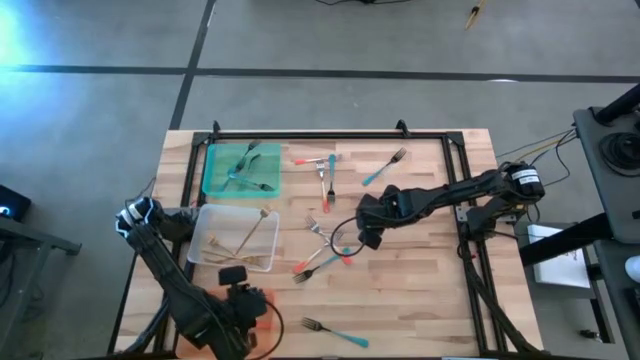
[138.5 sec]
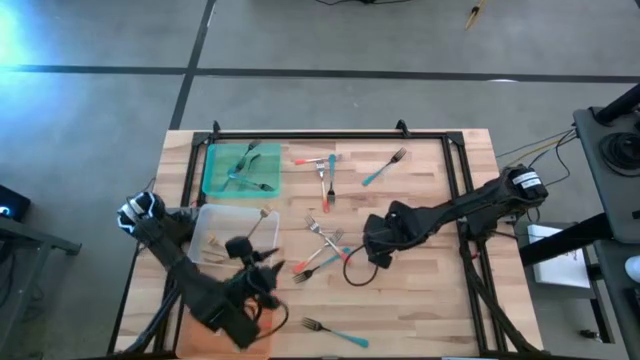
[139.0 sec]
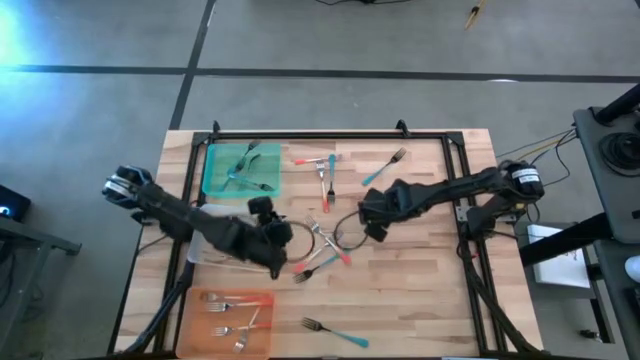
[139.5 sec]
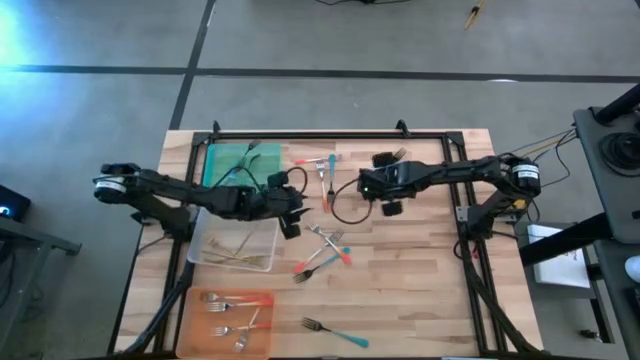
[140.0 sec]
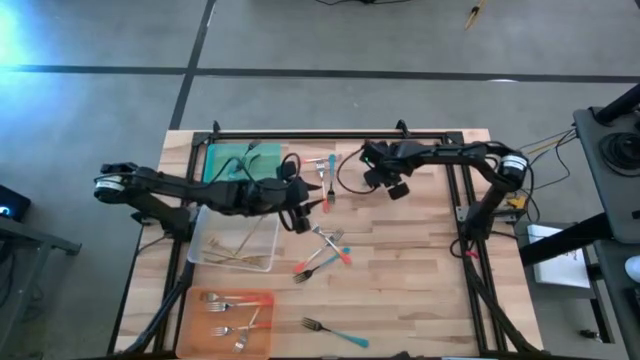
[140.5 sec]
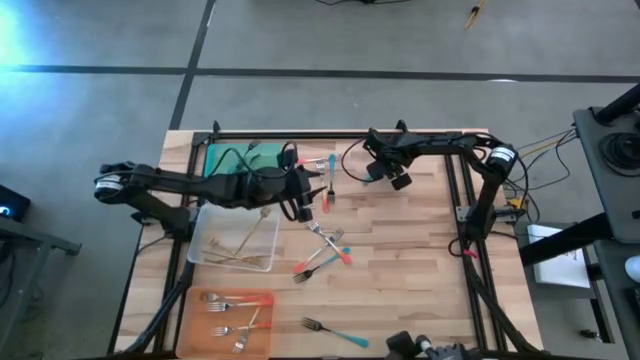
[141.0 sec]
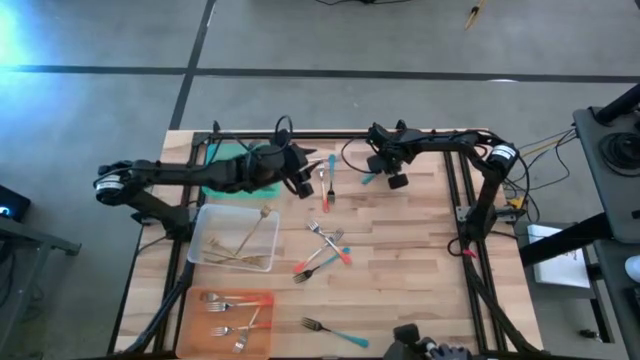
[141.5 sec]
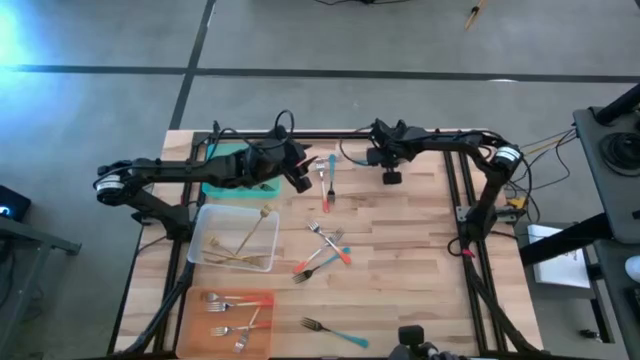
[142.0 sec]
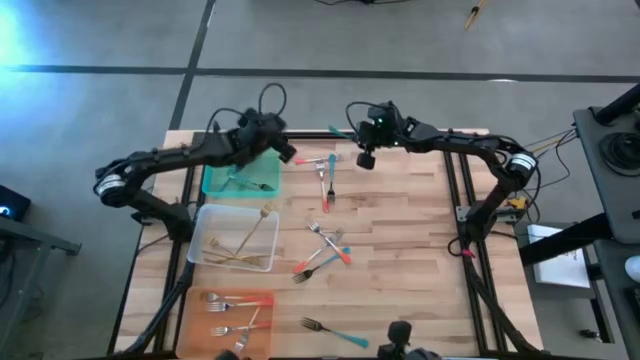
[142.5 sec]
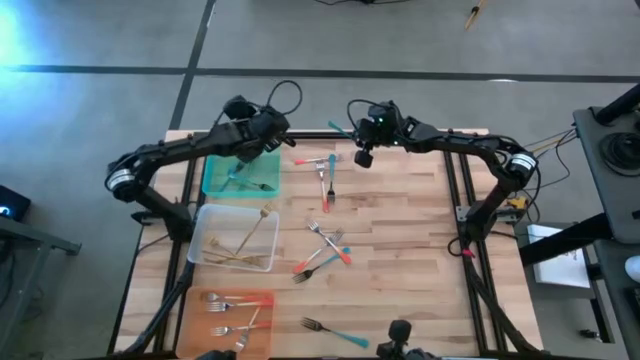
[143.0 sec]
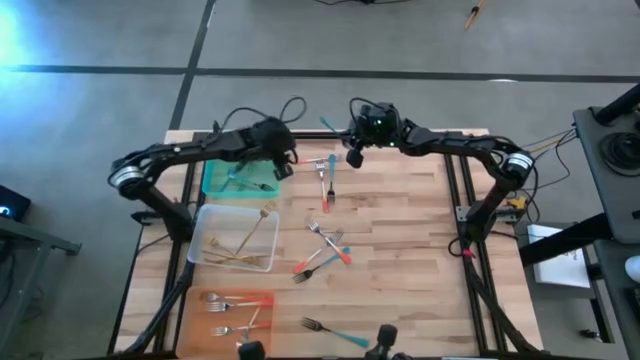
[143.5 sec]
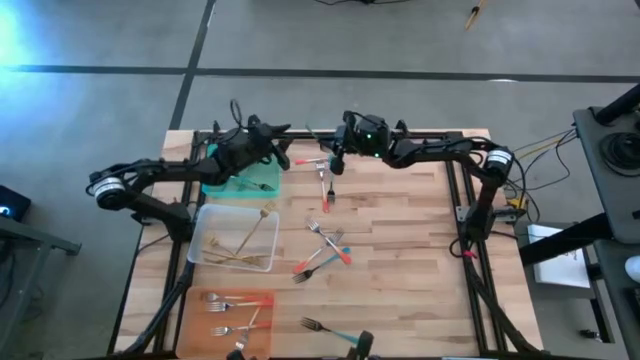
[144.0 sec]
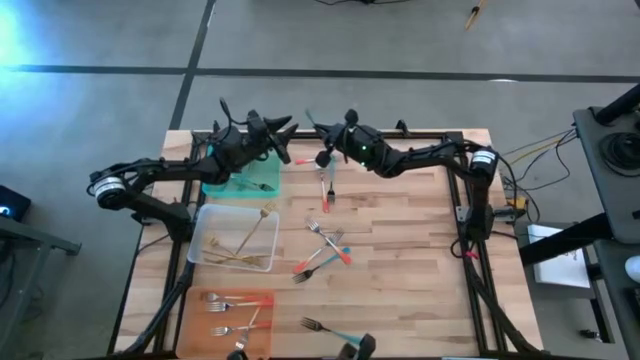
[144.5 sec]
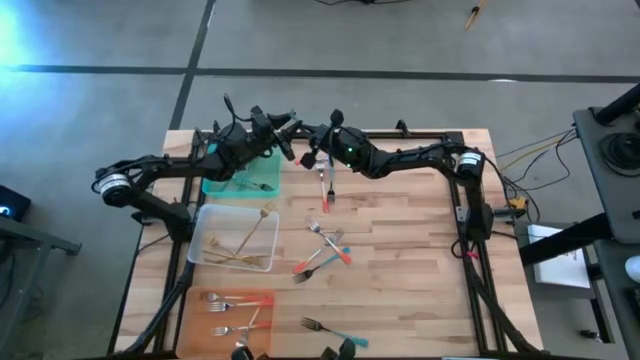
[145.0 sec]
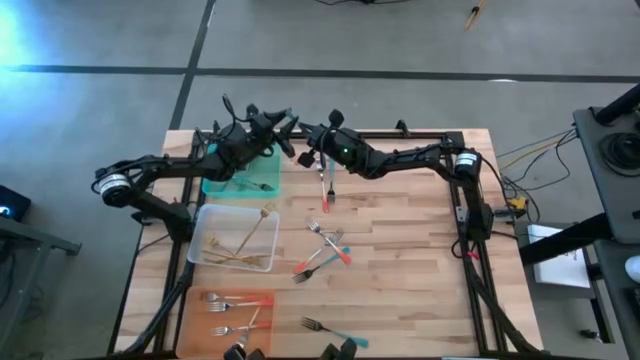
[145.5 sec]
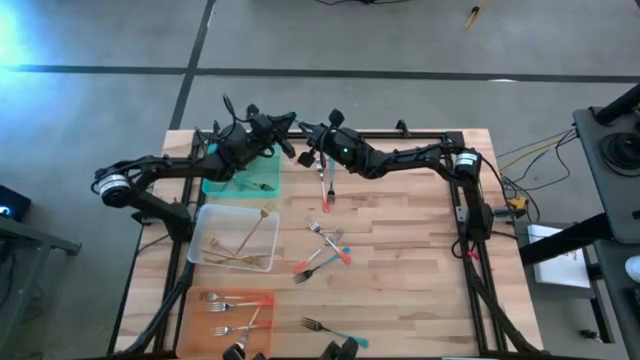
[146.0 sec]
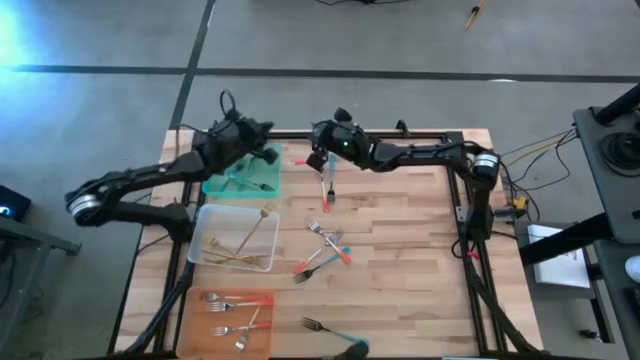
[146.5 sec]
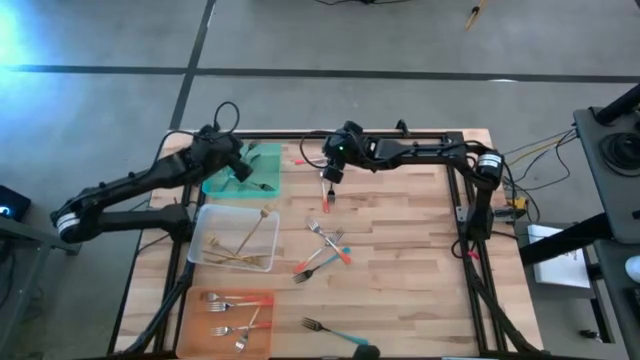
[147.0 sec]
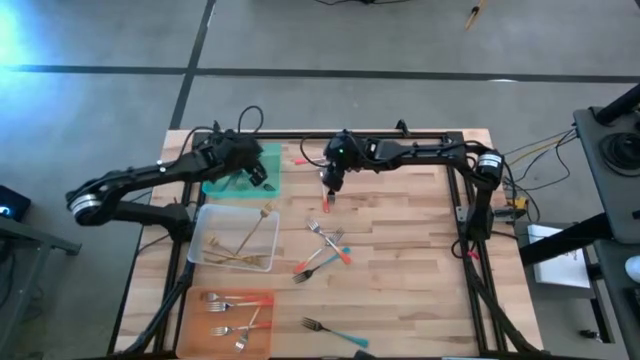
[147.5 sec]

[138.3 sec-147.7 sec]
Task: Sort silverware by color (type)
Put the blue fork into the blue bin

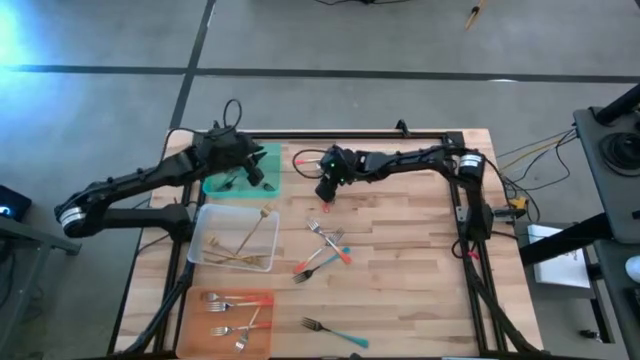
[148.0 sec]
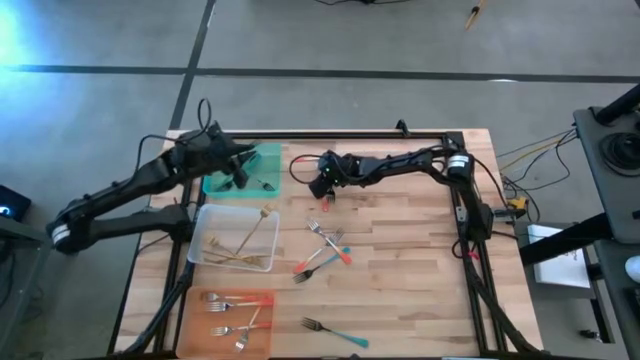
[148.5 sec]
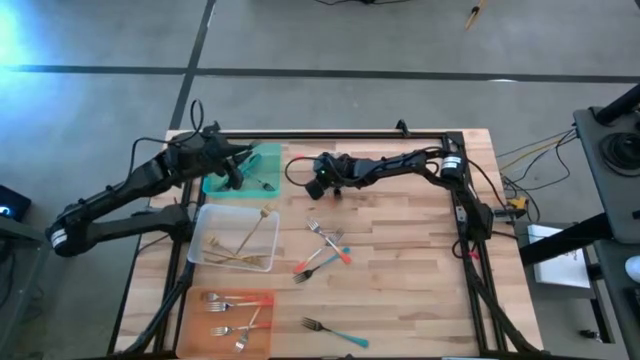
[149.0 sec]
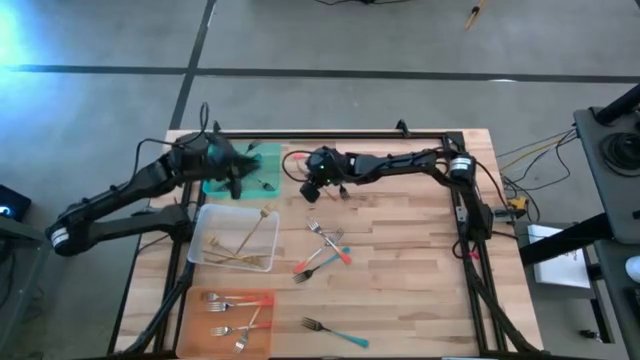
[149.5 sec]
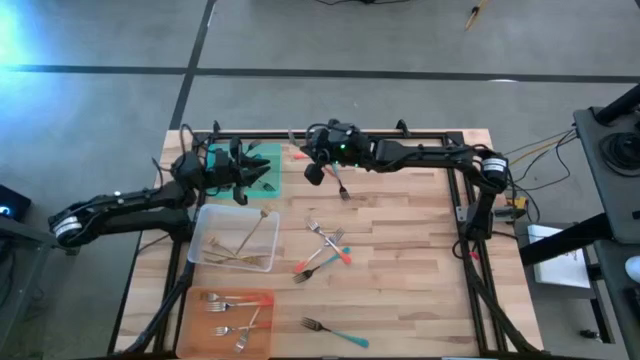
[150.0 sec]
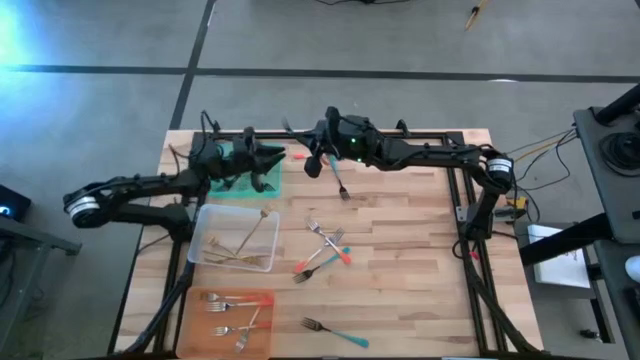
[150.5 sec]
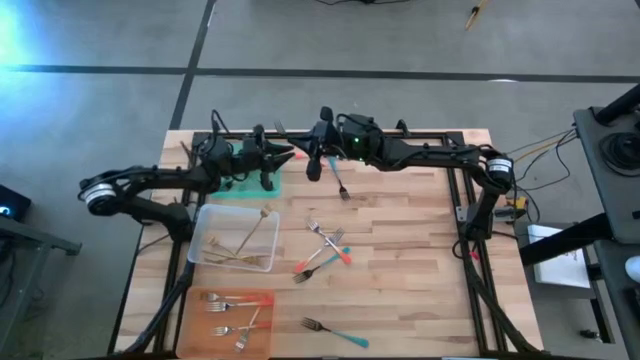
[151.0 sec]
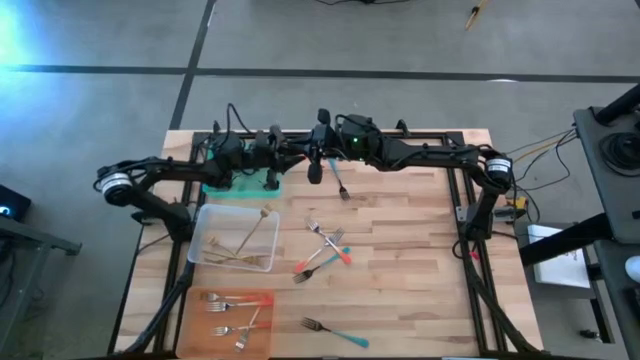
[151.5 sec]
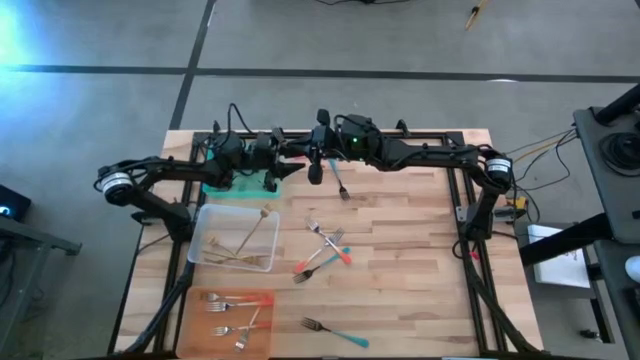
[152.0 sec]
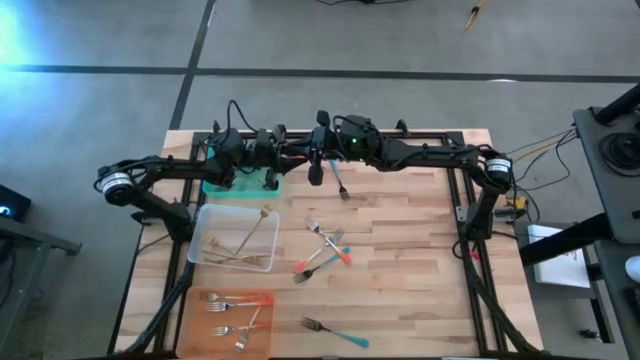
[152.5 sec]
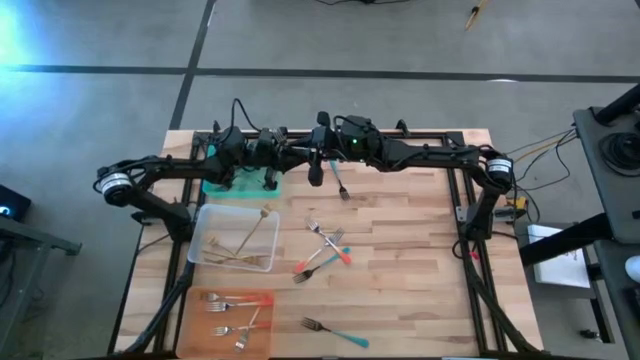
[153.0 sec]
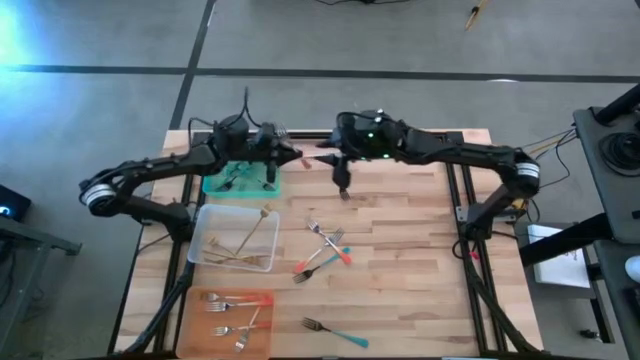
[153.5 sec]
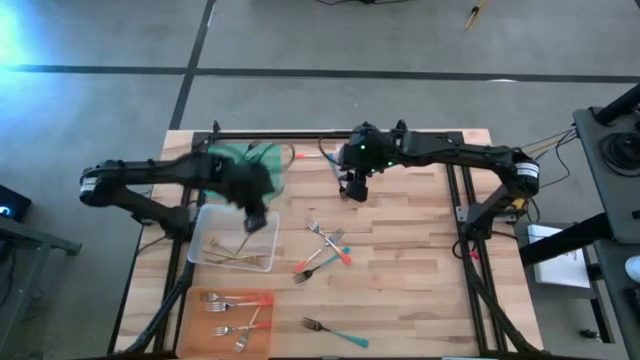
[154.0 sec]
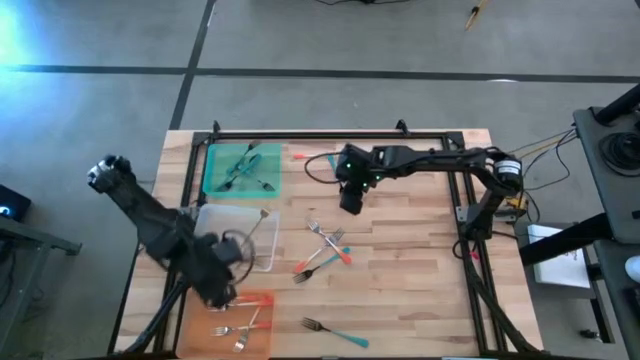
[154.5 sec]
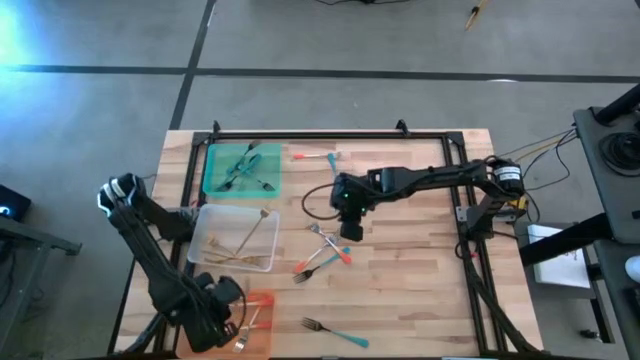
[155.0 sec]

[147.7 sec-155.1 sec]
Put the orange fork into the orange bin

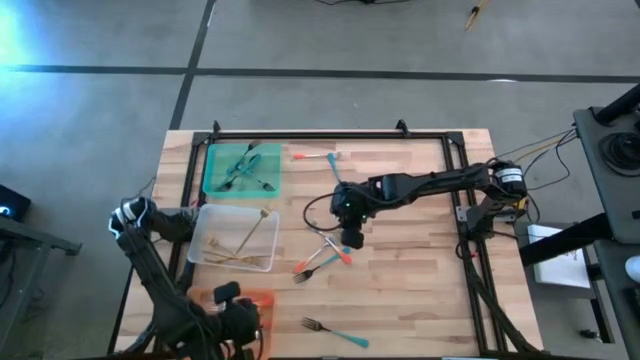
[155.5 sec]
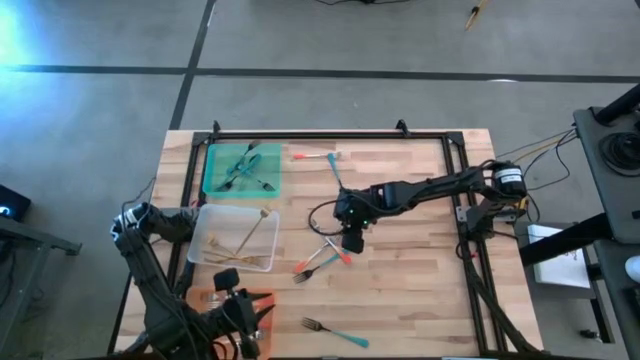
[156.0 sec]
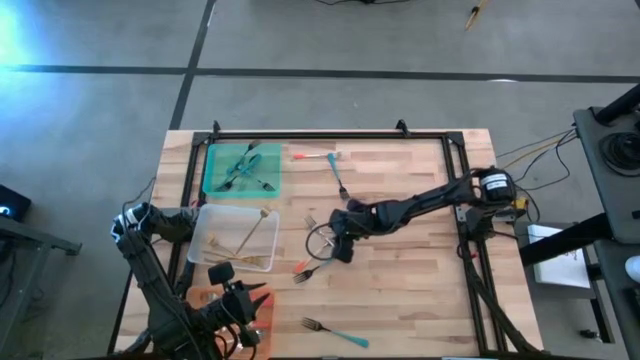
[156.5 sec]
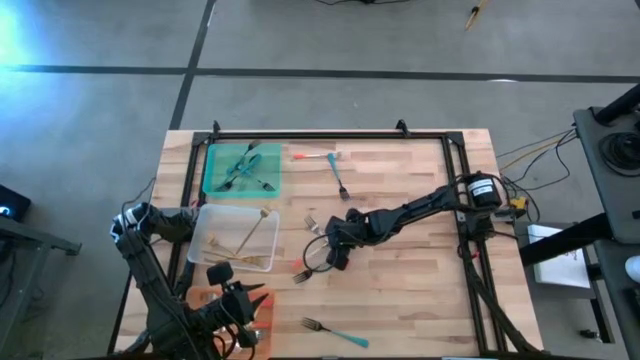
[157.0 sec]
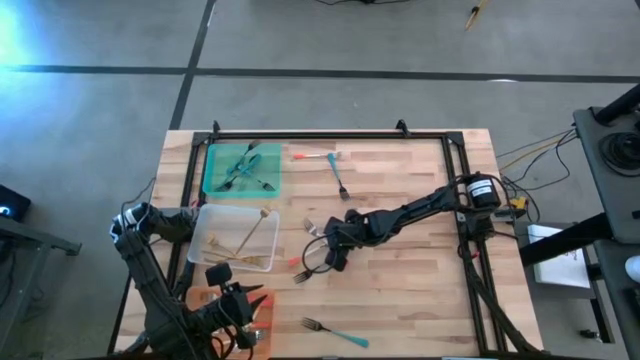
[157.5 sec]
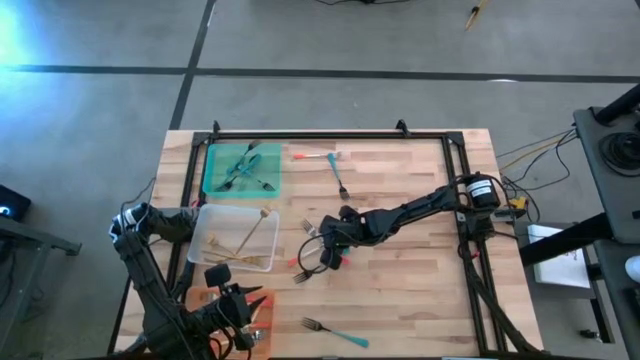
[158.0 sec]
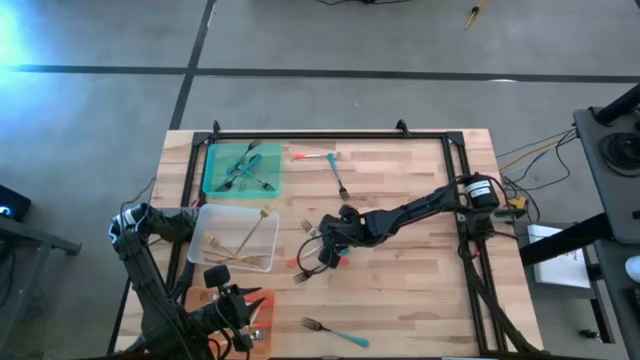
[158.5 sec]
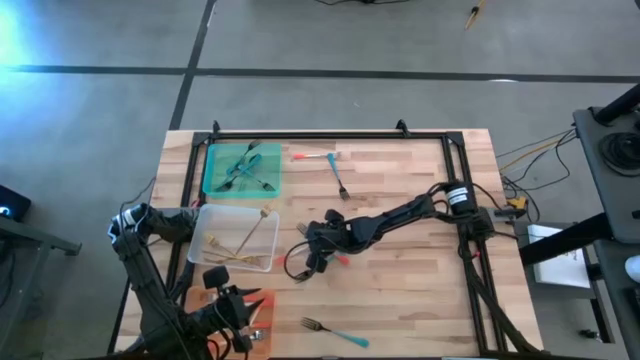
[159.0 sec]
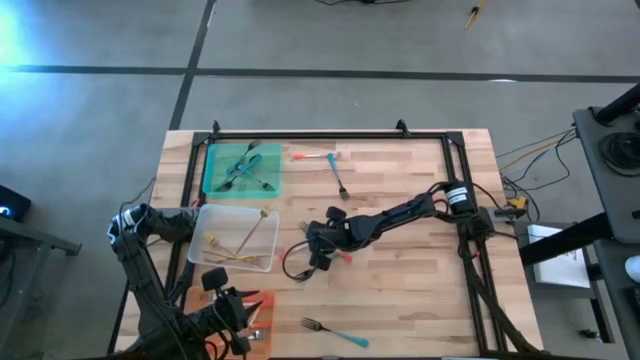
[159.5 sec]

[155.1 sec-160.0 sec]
Put the orange fork into the orange bin
